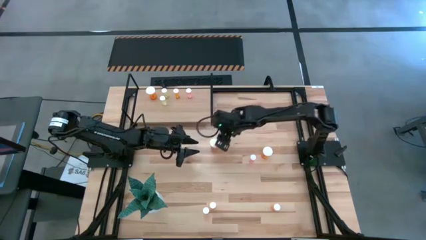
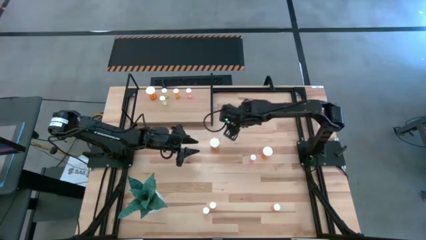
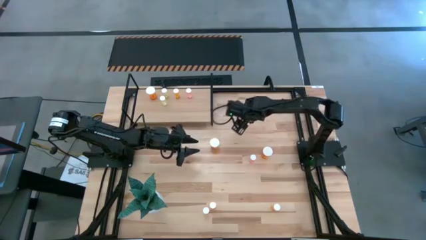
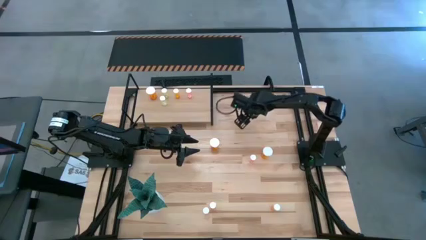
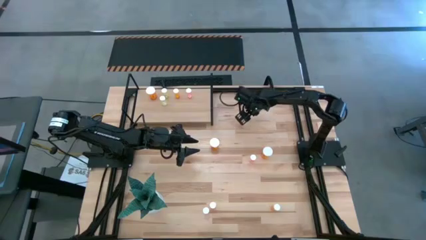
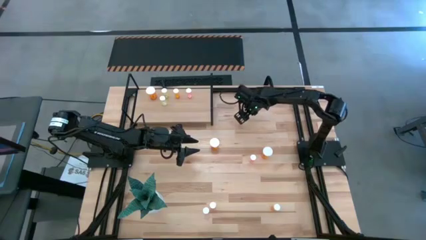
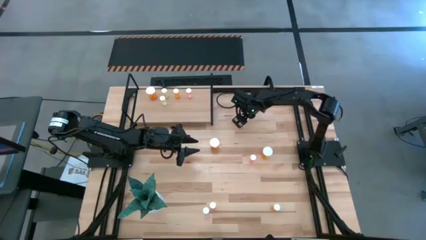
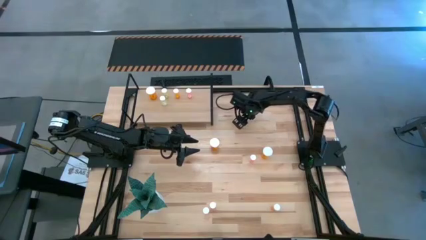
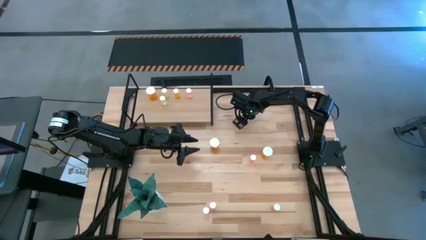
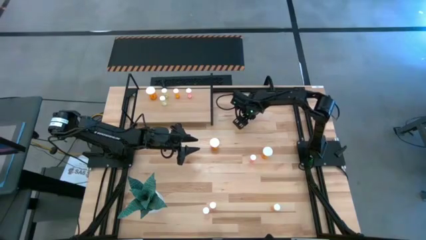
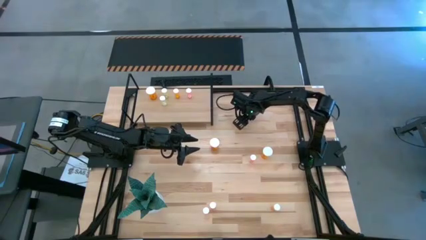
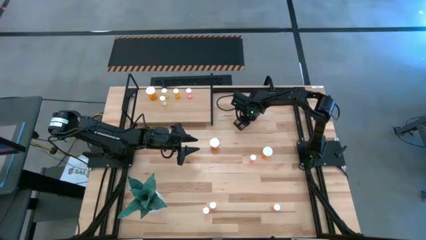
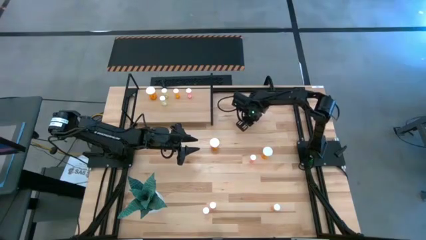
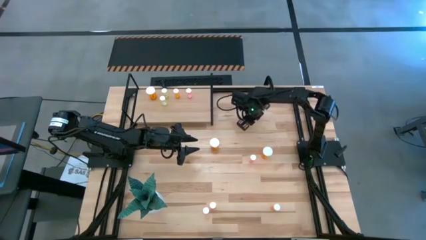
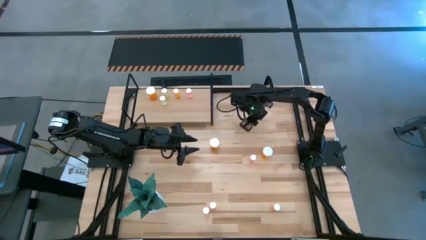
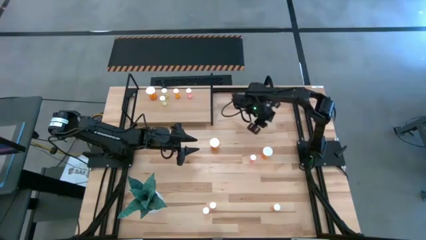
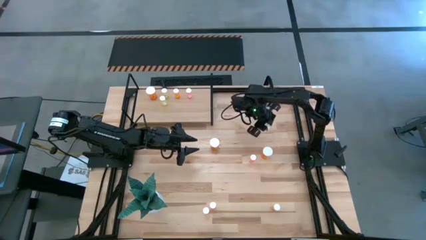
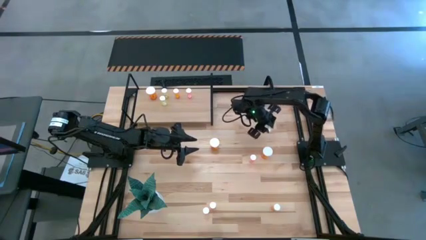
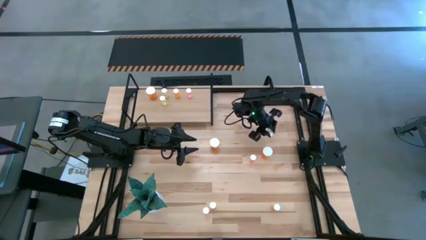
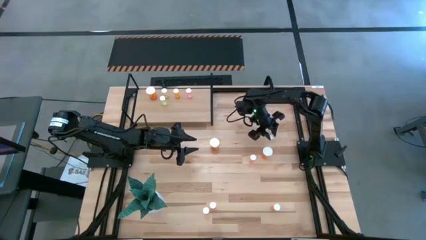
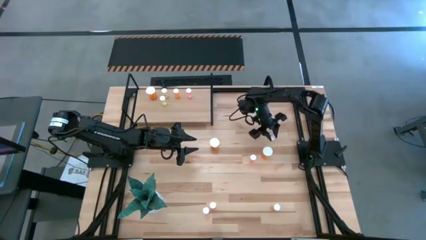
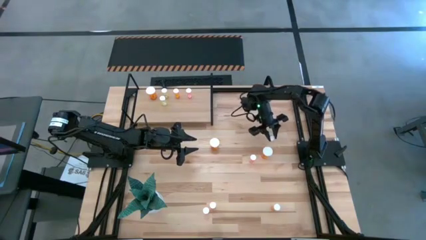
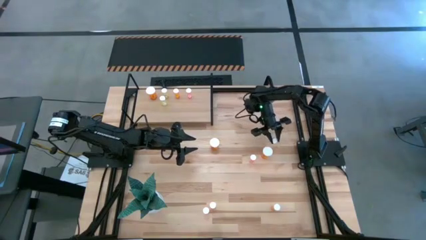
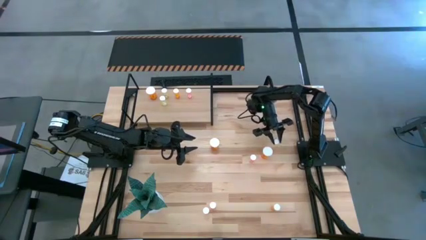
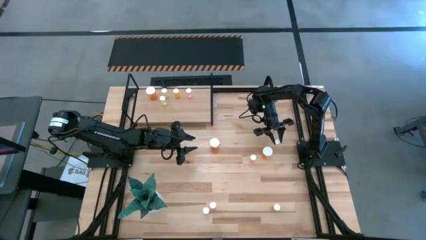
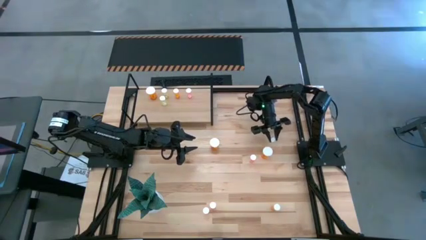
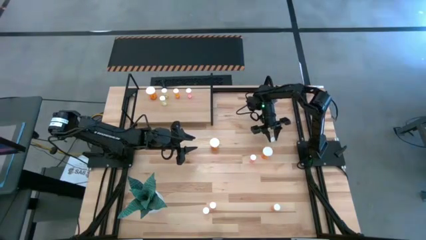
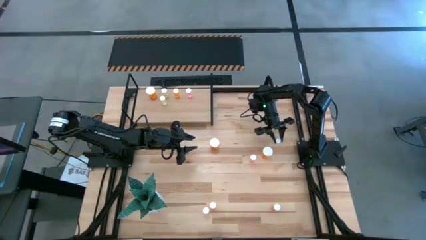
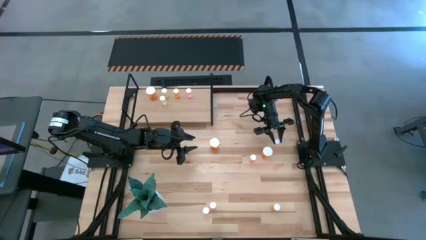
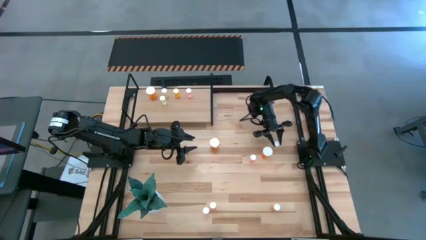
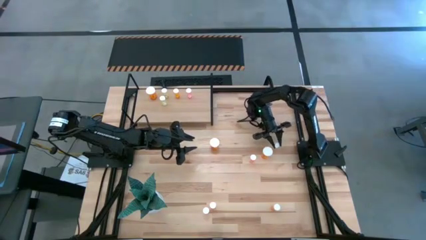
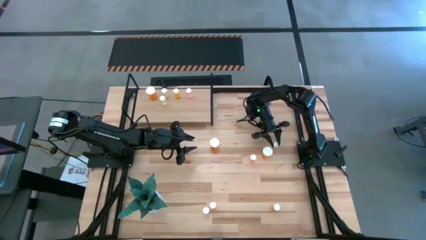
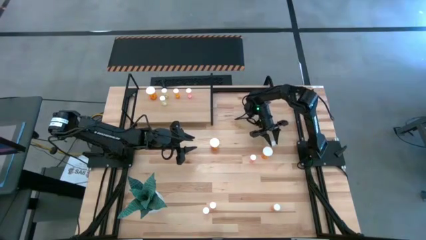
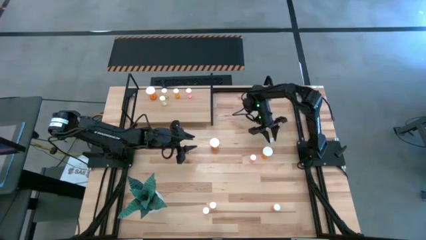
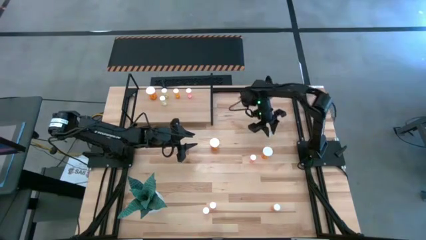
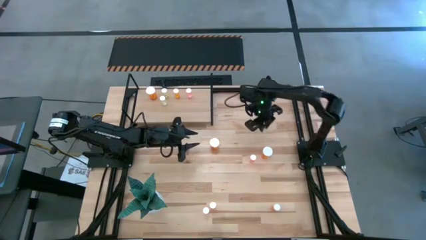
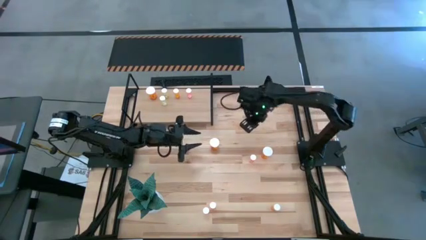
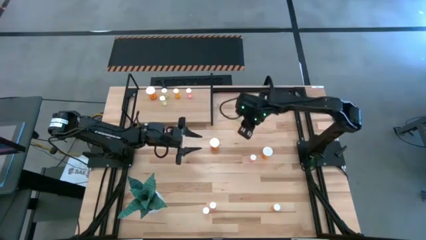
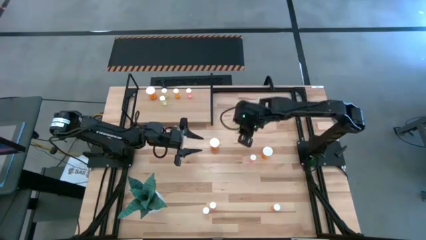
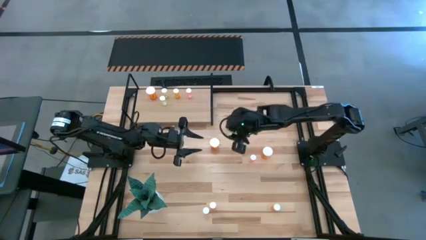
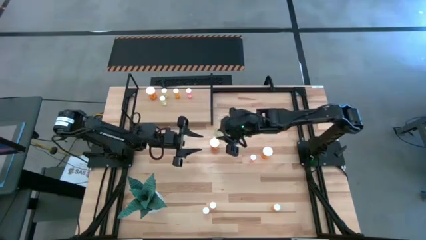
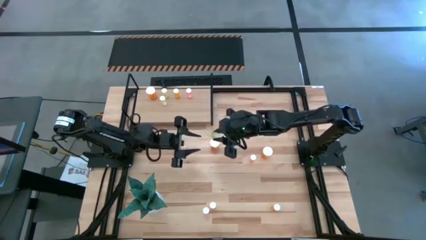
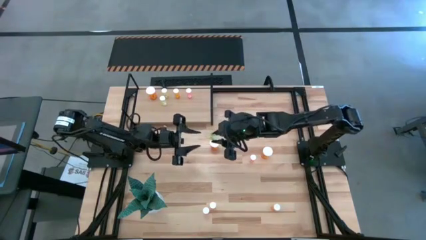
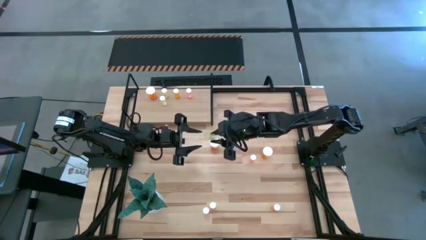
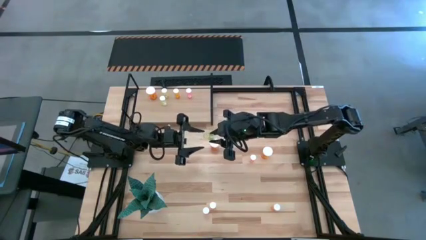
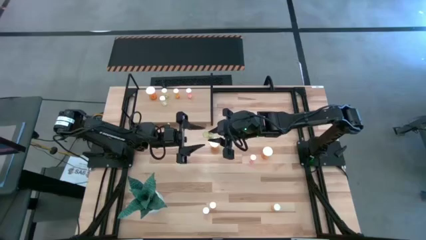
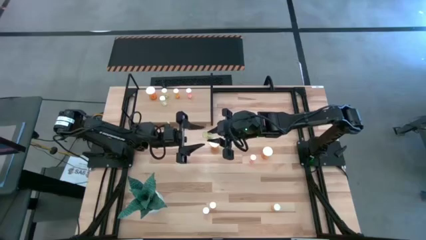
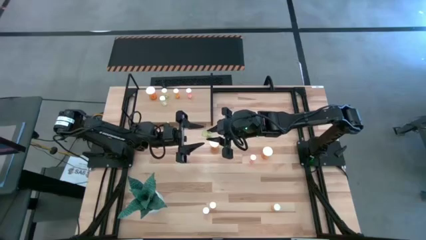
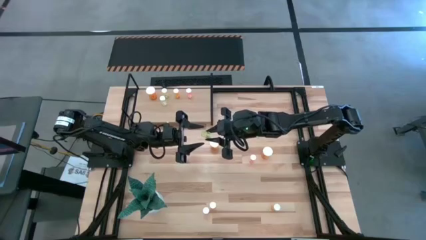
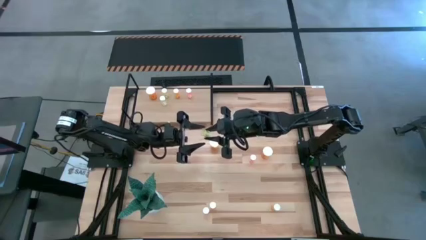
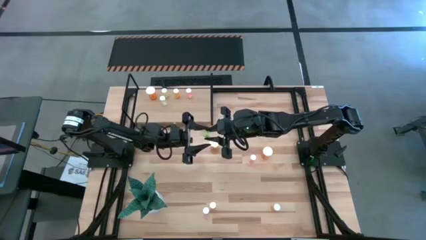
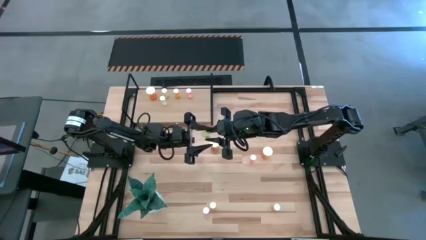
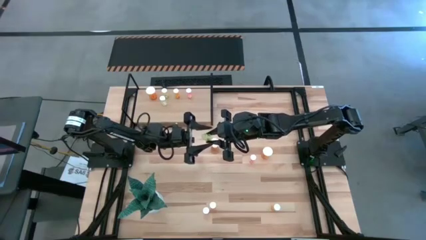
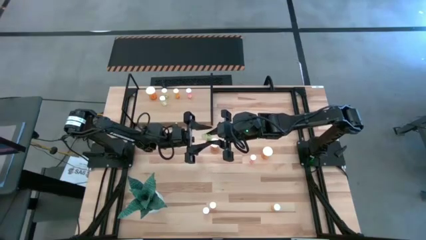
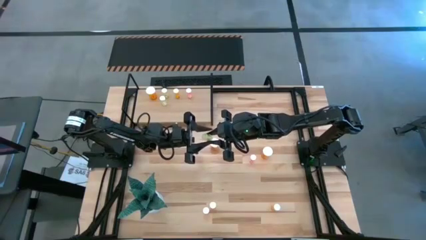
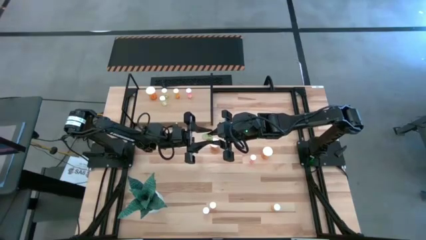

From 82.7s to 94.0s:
Task: Pick and place medicine bottles onto shelf by color
Move the yellow pill bottle to the middle of the table
